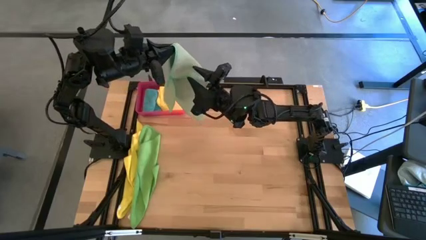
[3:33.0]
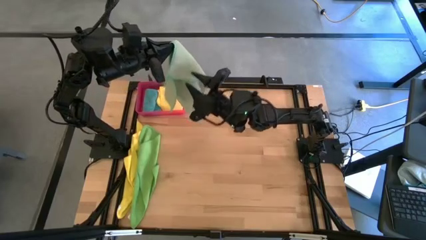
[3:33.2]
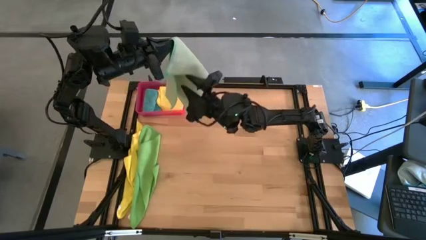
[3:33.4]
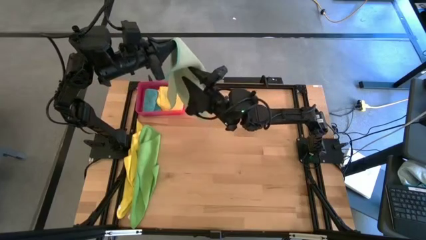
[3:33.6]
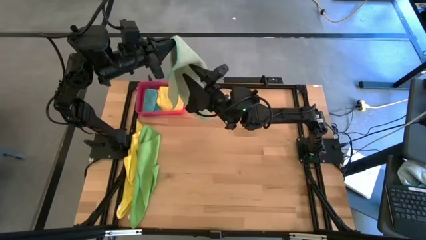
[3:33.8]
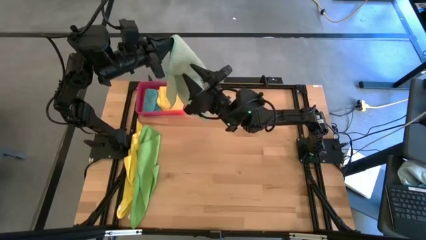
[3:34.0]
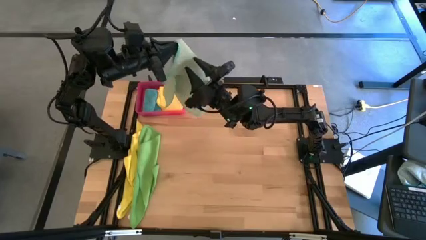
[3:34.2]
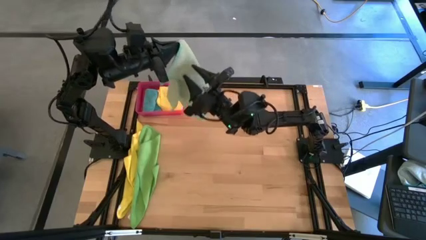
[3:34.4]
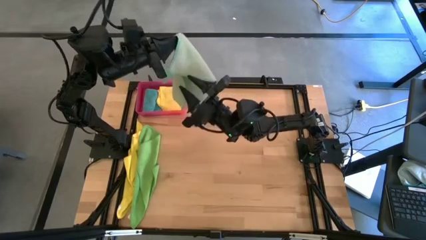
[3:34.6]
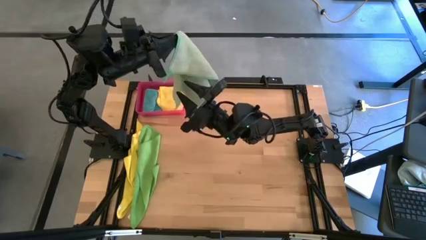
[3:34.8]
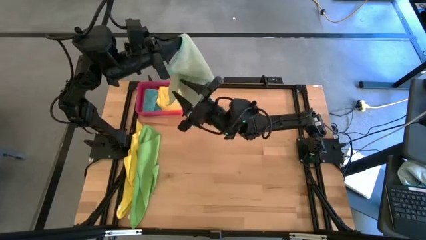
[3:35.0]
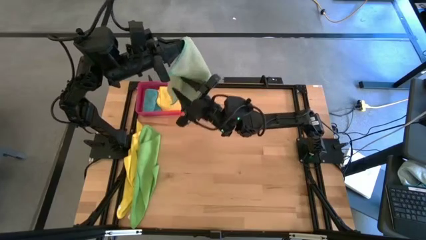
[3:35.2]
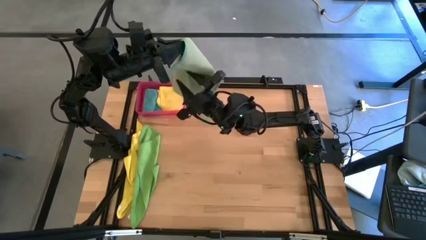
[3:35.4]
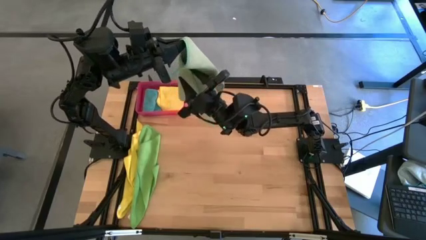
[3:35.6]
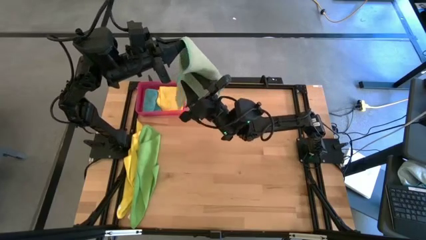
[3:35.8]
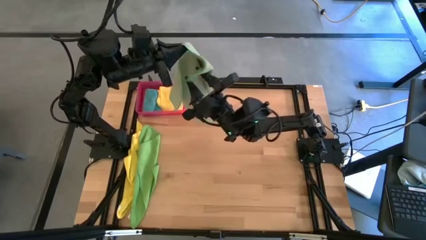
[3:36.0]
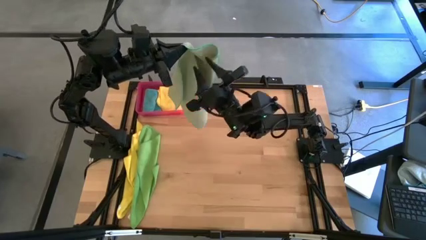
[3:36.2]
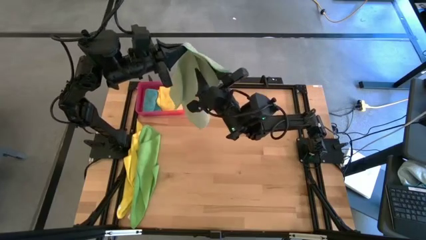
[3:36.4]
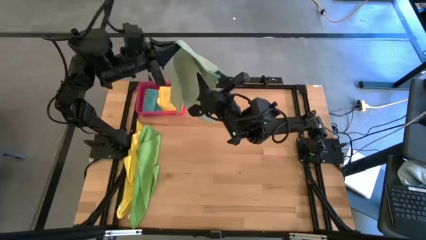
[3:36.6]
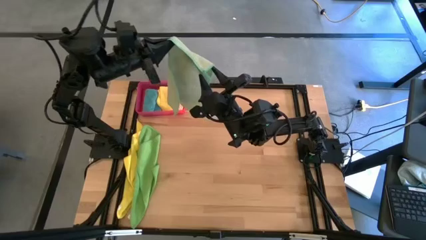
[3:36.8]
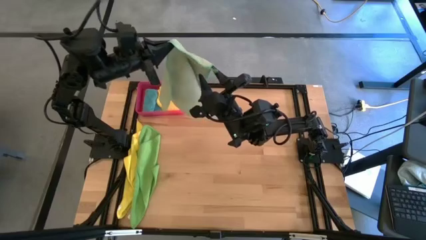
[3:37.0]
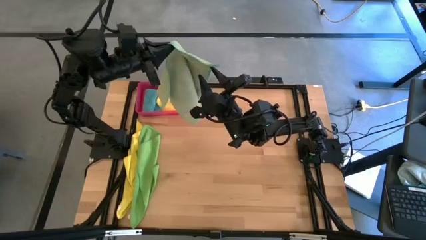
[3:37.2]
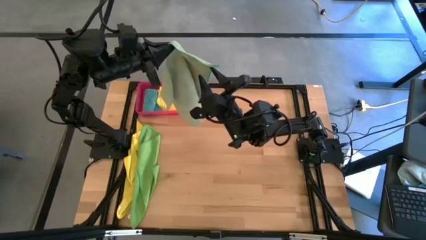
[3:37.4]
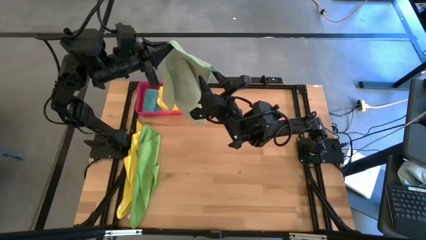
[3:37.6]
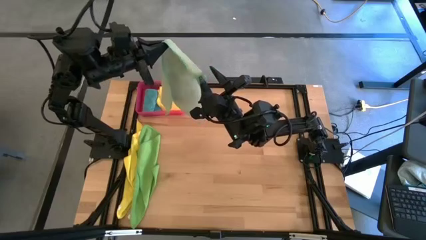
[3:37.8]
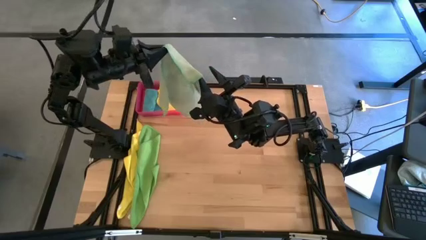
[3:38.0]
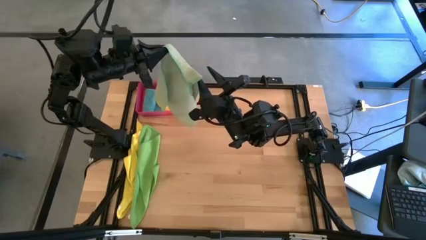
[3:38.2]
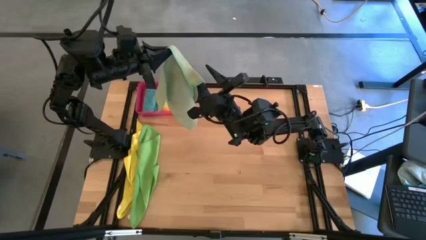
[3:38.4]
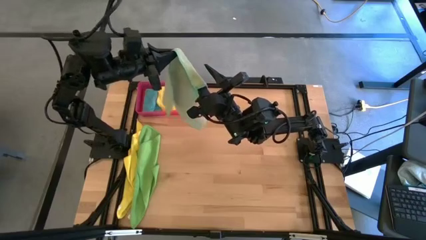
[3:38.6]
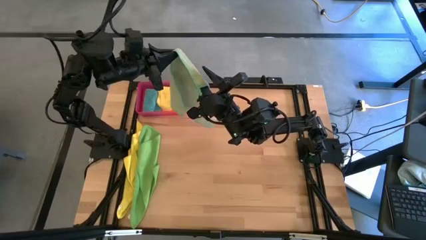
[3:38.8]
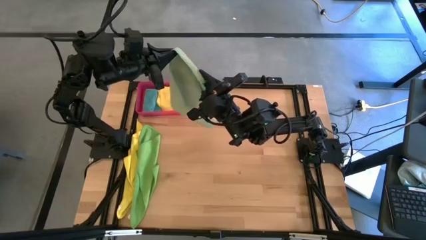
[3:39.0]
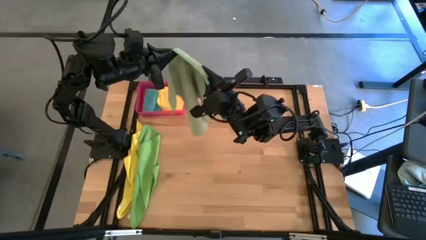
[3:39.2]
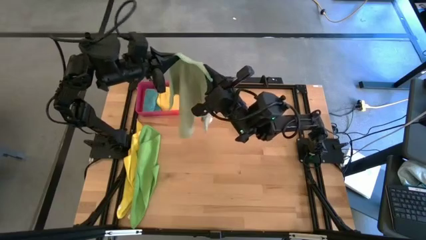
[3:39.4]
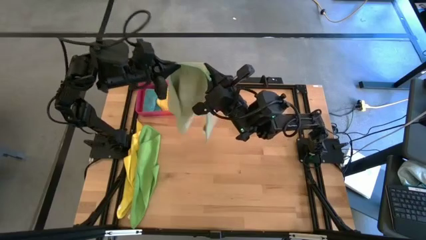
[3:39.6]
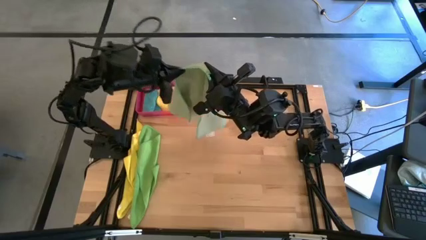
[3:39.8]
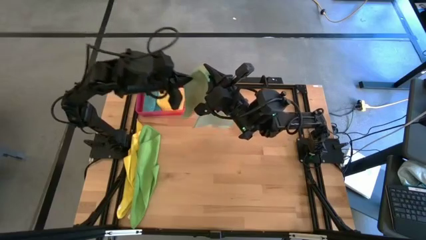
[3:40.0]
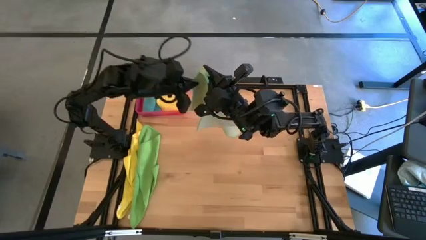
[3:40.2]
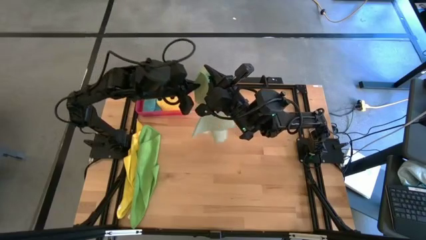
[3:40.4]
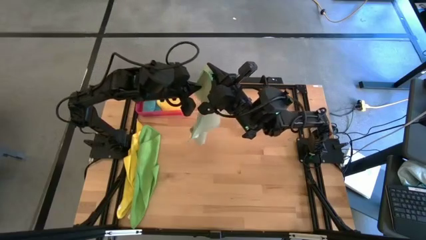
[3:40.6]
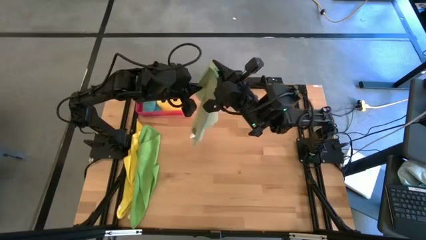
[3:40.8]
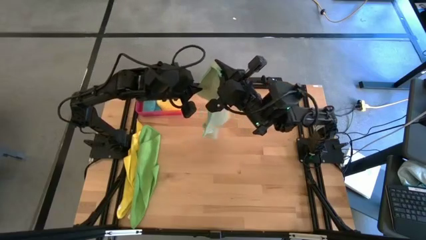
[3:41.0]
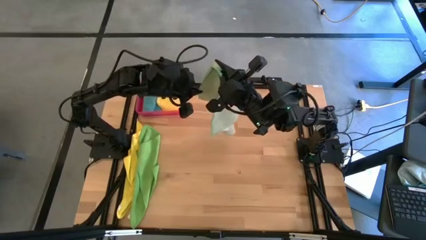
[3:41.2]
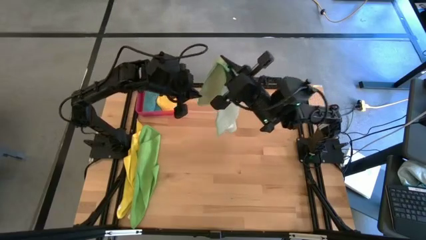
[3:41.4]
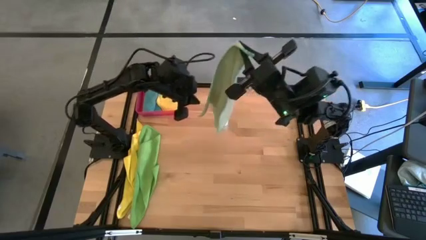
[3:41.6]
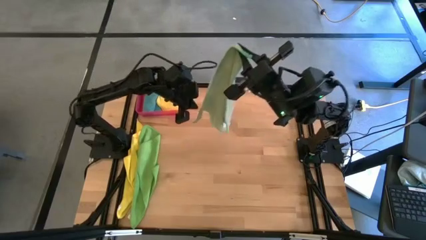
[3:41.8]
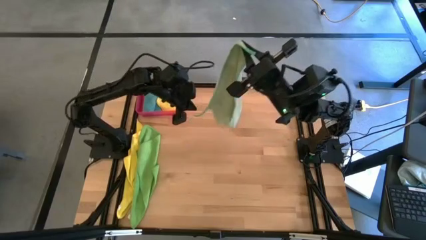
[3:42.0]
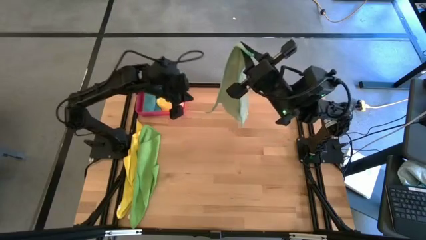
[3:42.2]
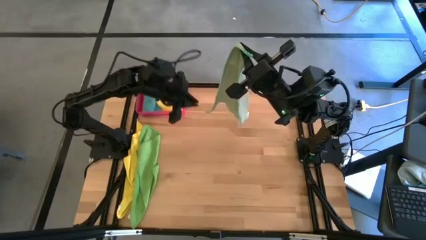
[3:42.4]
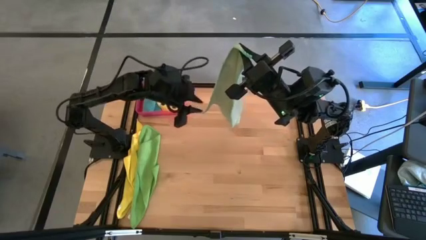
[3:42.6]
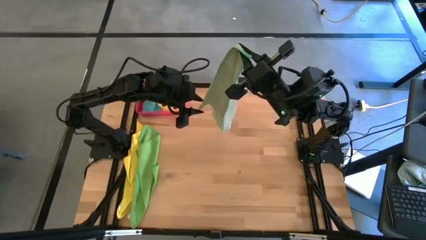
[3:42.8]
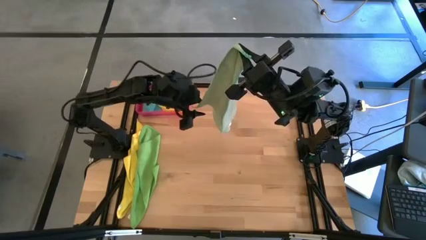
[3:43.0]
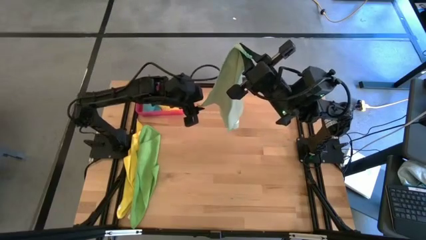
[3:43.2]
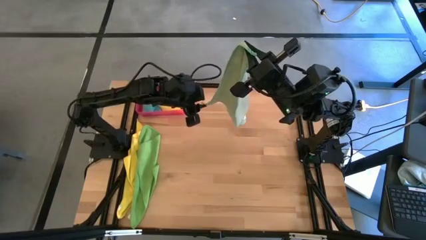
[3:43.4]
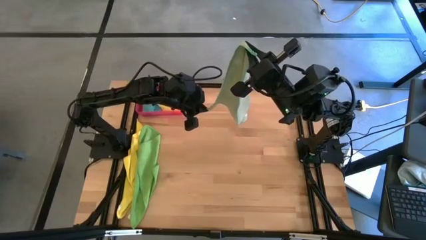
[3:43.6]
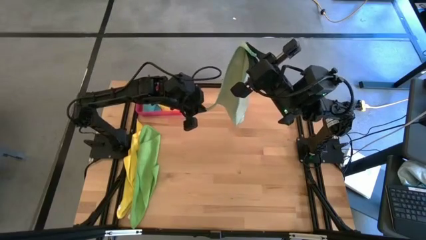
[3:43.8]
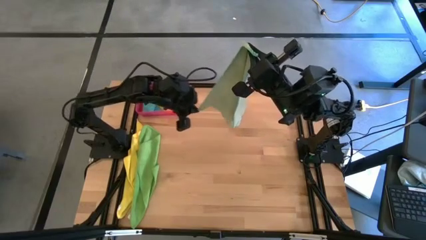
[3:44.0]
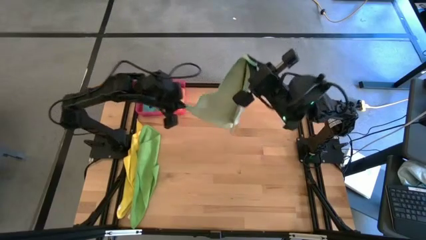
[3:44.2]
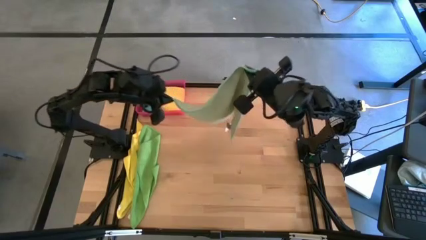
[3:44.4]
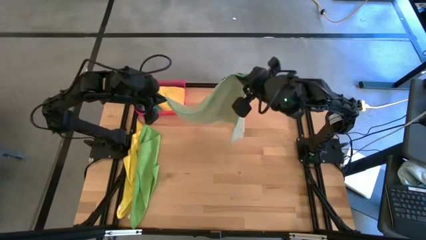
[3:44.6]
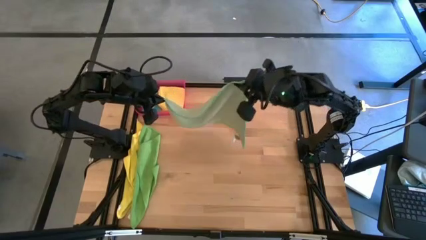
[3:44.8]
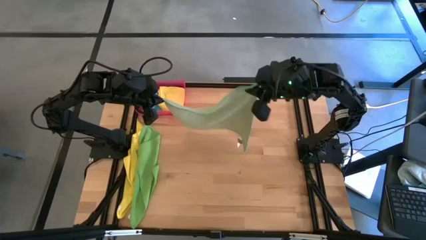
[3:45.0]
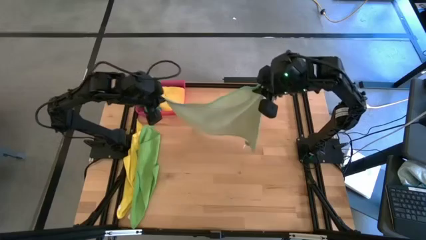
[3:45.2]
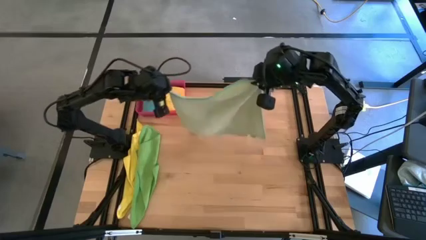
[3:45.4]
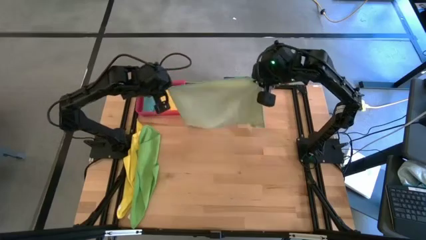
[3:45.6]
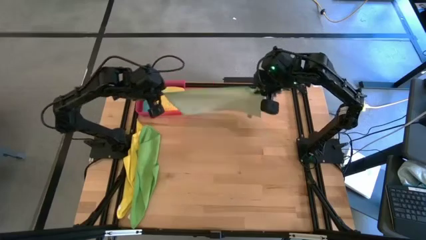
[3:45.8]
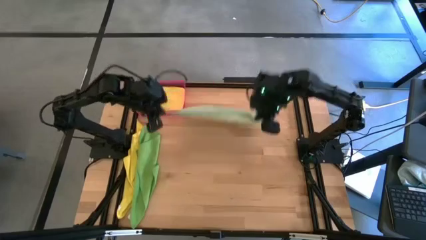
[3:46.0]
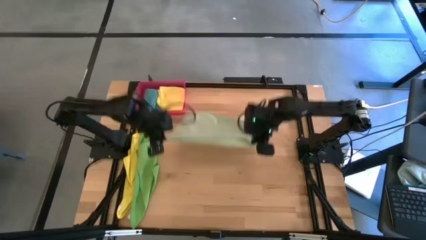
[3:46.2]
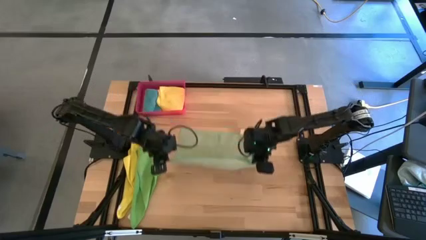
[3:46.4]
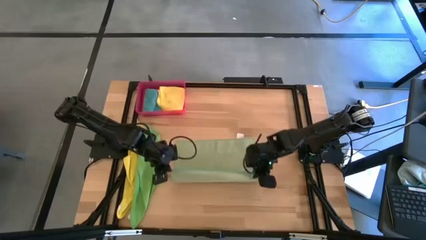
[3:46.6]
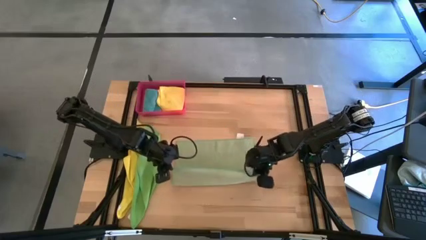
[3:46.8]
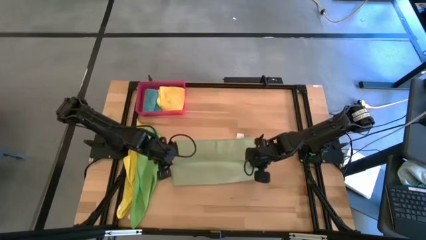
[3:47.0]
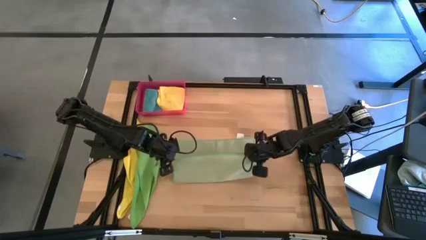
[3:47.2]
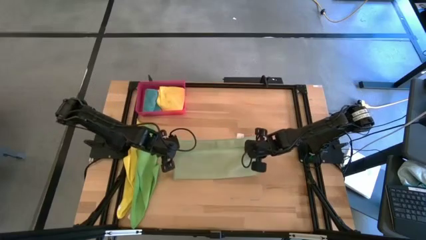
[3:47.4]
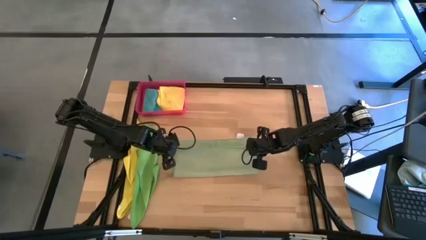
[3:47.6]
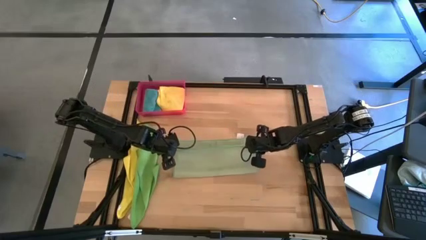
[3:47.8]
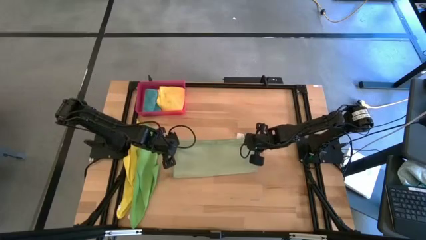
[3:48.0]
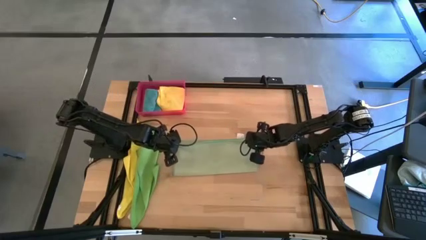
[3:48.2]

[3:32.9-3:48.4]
Task: Fold microfiber towels
Fold the light green microfiber towel
